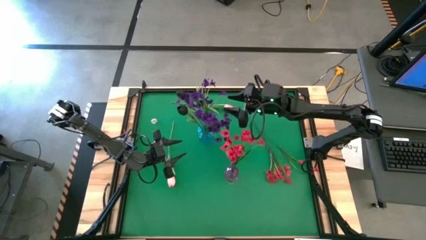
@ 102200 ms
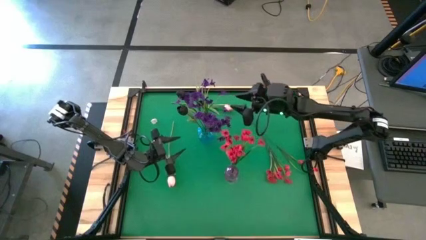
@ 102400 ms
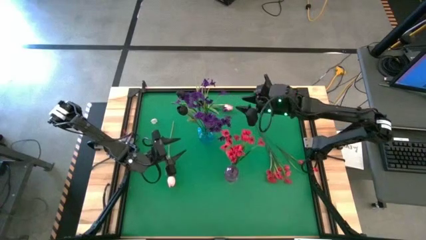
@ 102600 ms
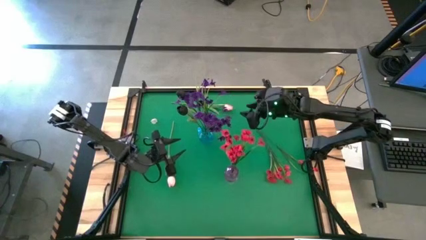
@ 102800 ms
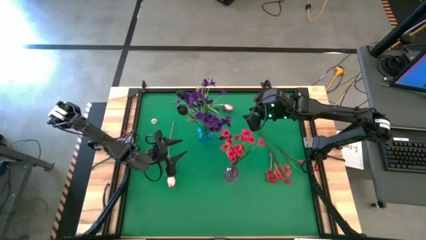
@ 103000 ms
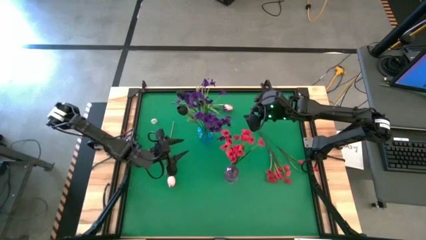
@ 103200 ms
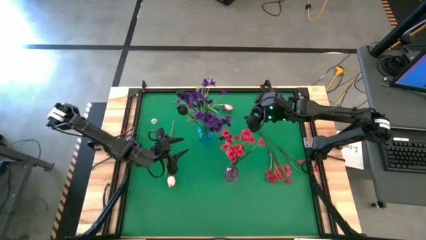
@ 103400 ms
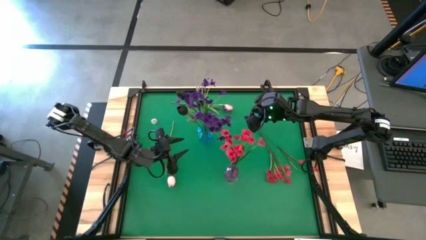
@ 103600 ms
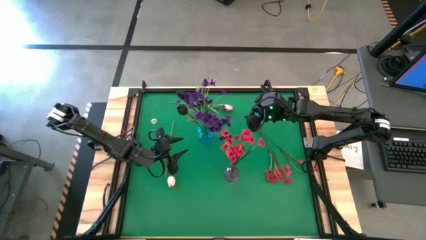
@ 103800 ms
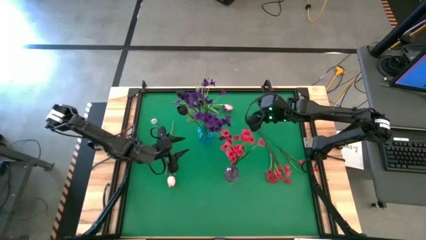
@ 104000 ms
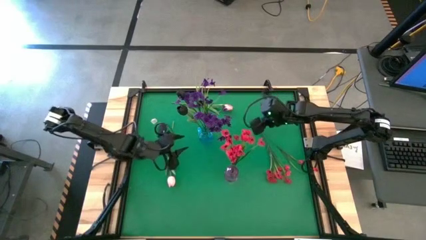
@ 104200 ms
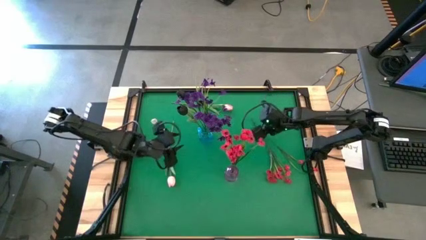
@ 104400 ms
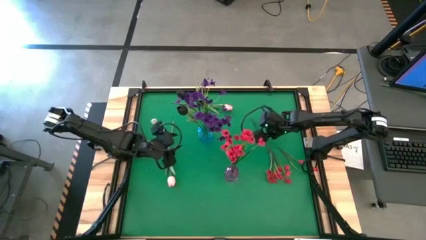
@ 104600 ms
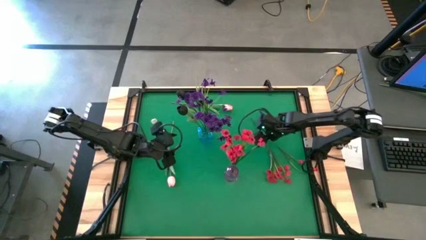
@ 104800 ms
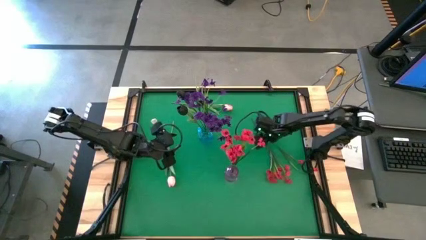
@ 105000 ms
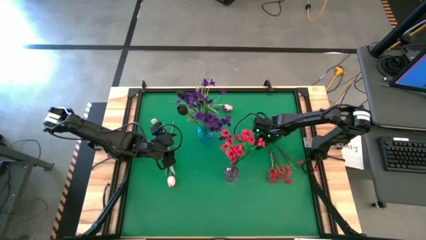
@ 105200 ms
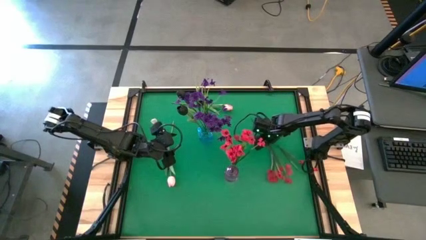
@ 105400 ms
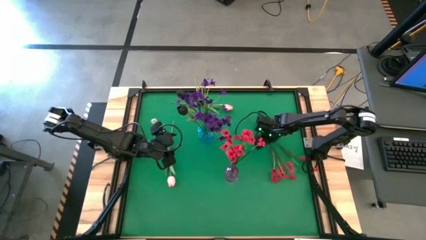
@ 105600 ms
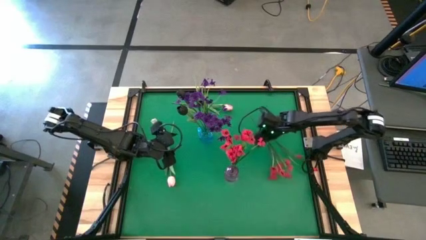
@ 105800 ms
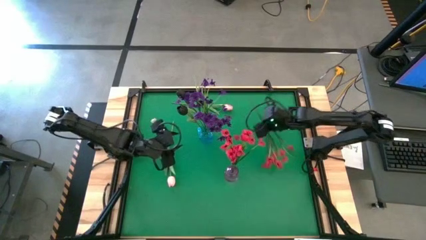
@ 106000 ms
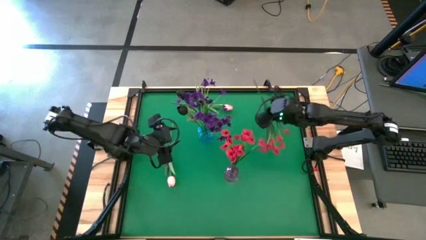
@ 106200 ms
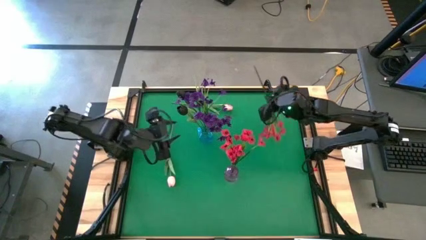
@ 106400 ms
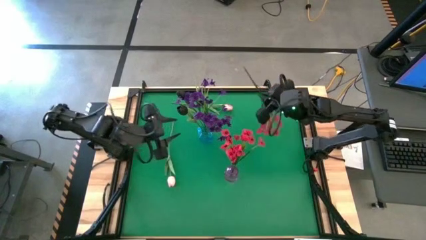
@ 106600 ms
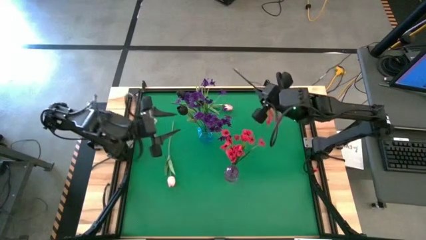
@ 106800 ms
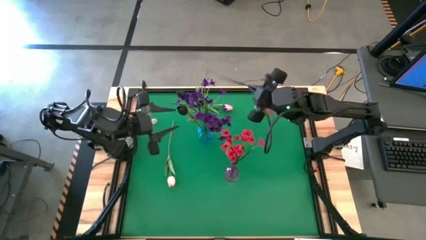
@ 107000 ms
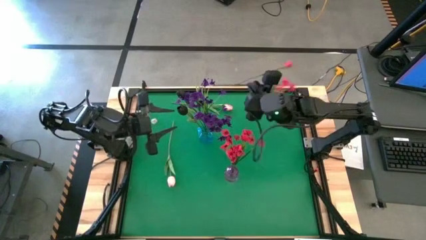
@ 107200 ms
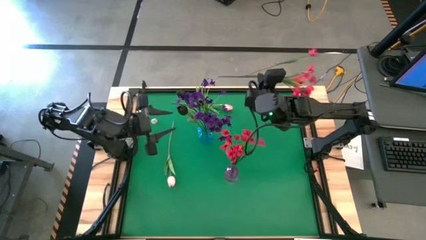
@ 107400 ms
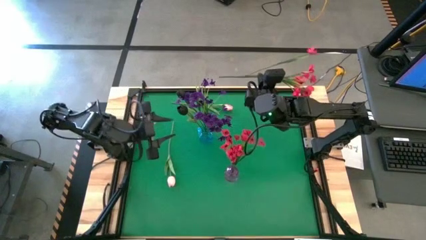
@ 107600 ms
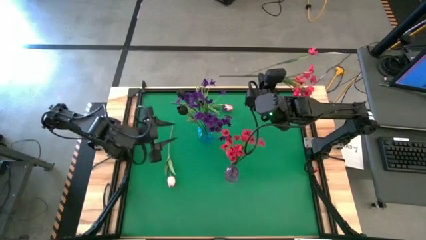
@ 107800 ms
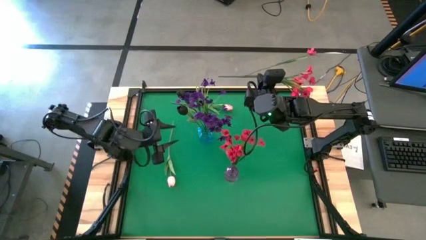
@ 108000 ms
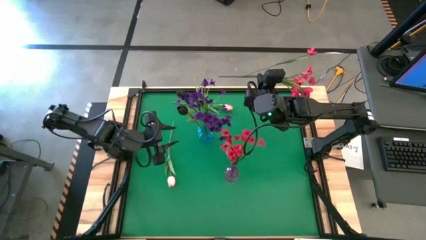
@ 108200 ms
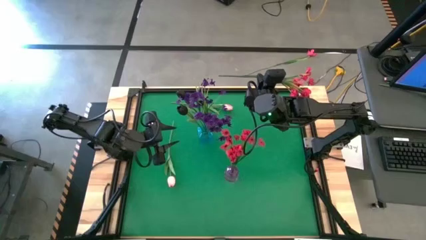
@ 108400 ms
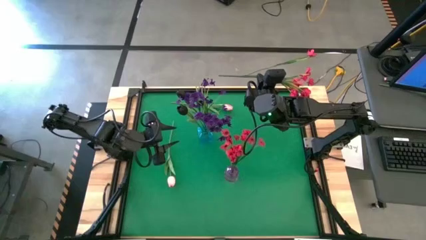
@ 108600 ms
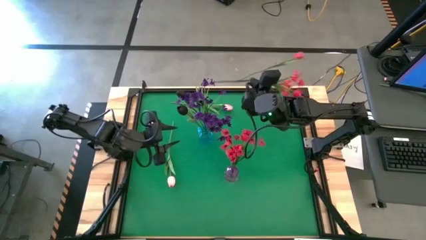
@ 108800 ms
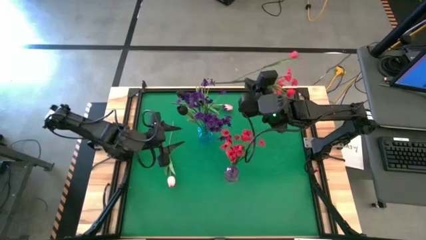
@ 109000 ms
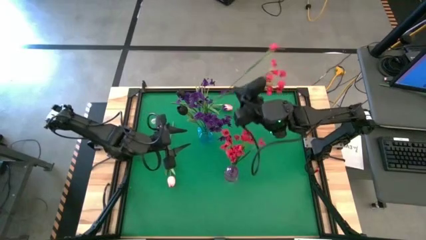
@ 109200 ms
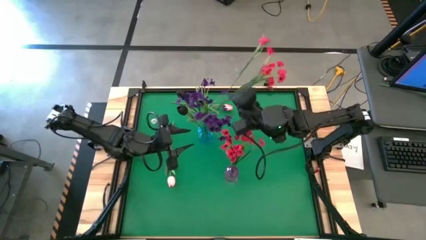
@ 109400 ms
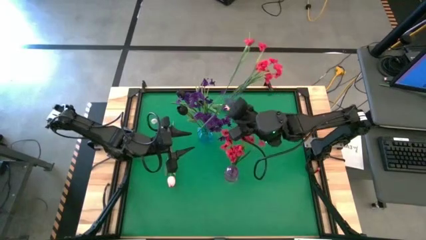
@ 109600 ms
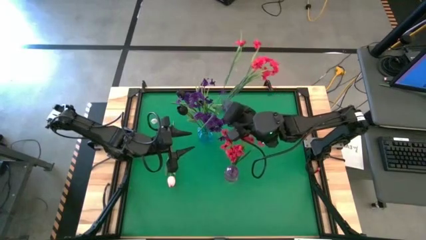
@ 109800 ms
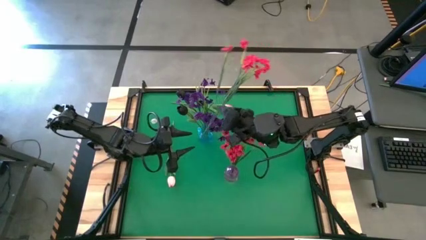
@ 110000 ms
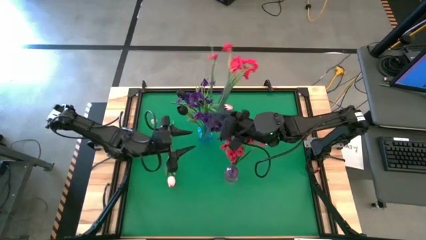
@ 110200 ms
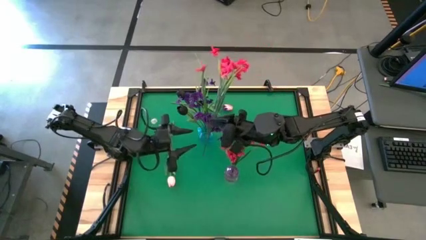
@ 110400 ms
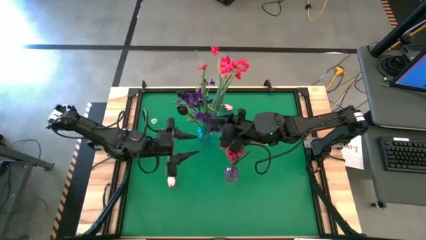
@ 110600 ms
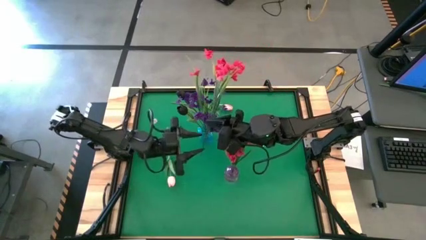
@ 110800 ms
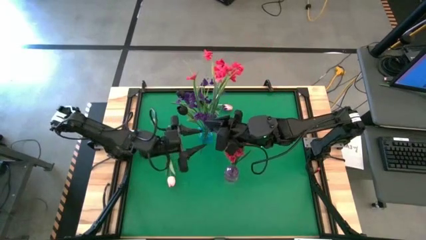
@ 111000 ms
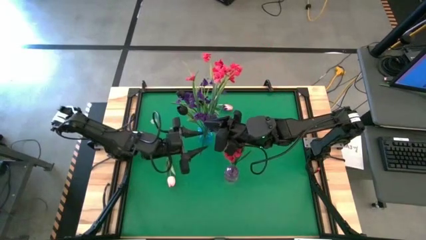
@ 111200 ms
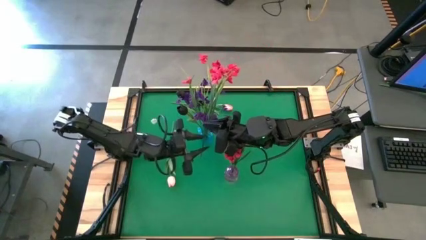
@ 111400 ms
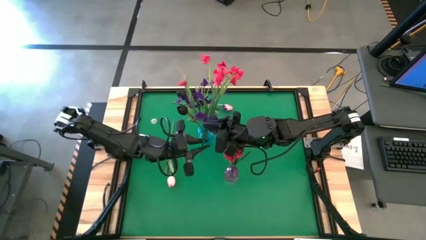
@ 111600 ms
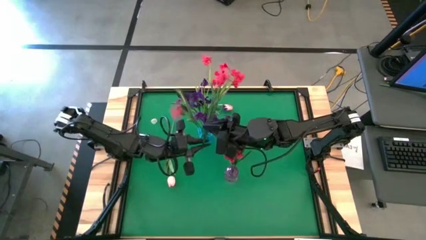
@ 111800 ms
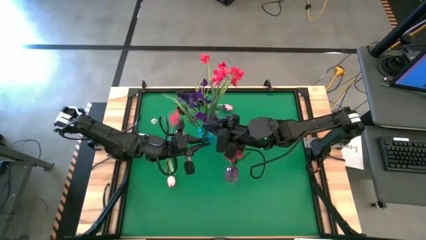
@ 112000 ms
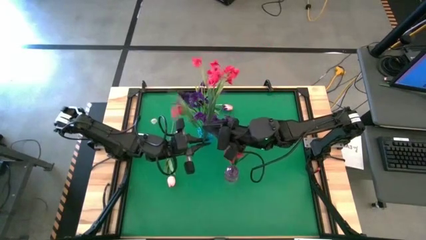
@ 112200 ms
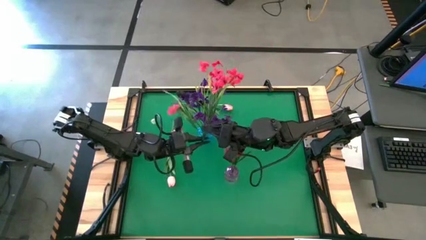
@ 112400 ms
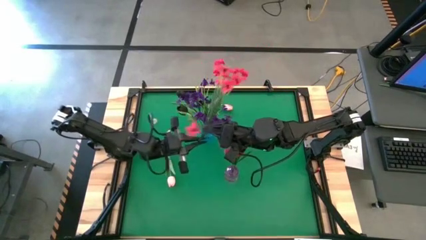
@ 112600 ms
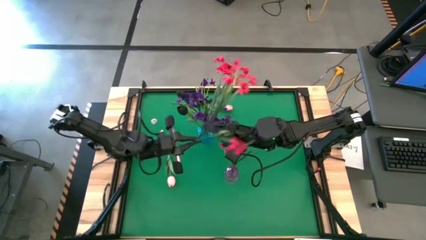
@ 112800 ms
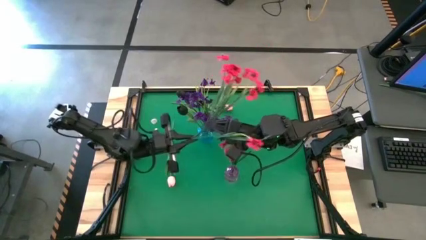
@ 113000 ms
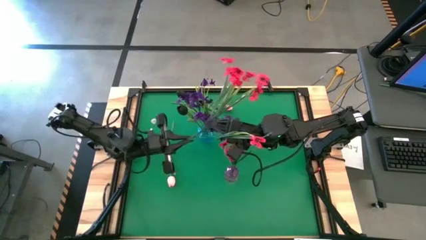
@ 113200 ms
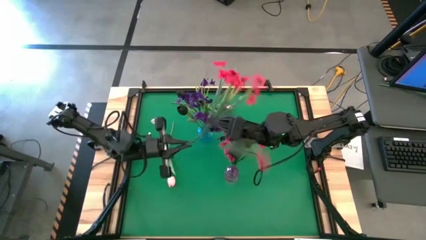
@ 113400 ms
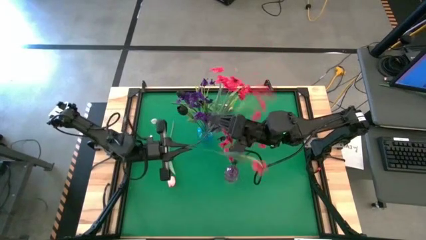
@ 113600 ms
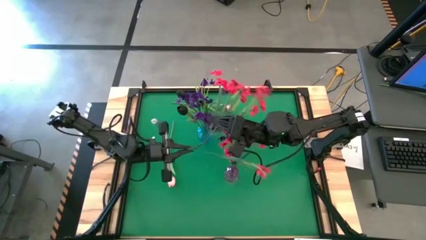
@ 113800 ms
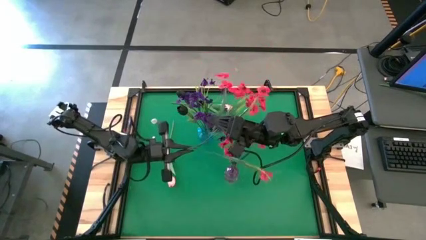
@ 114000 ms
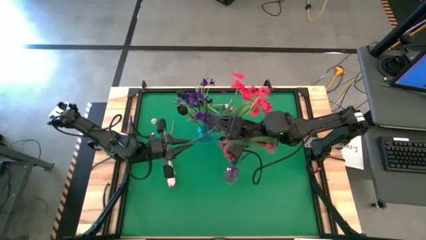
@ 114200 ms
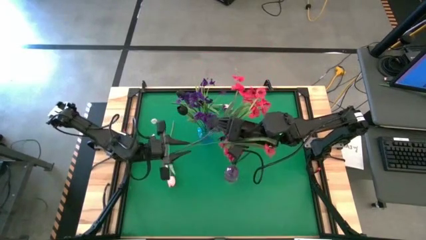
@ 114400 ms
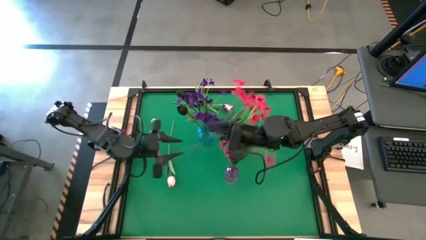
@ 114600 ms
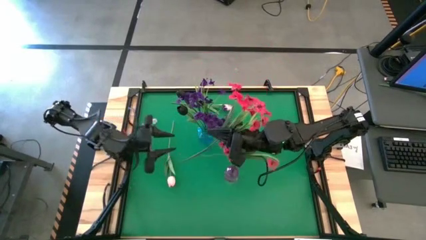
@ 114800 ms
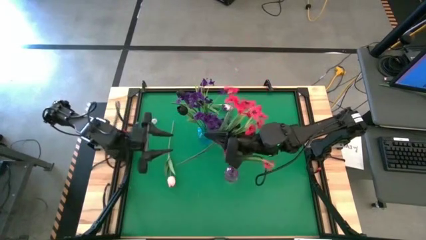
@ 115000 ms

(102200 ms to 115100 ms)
Task: Sort flowers into vase by color
Put the pink flowers into the purple vase

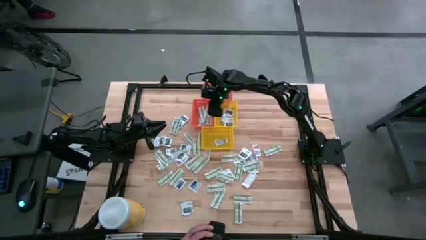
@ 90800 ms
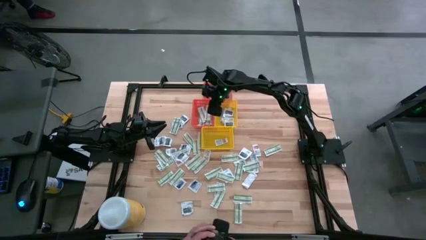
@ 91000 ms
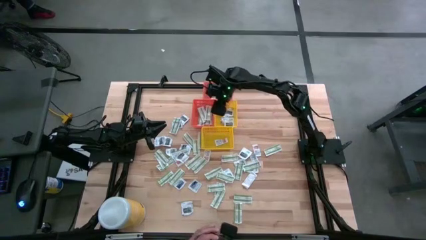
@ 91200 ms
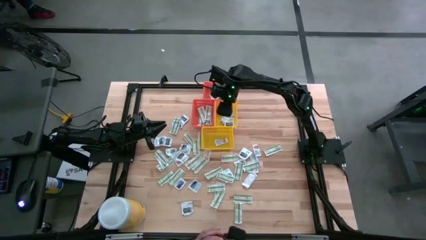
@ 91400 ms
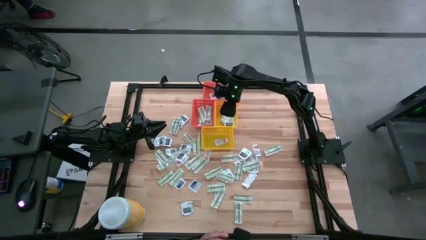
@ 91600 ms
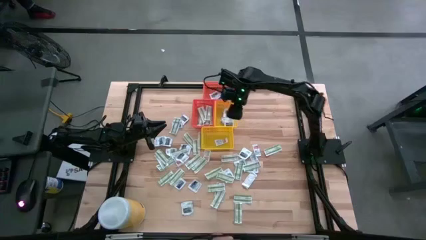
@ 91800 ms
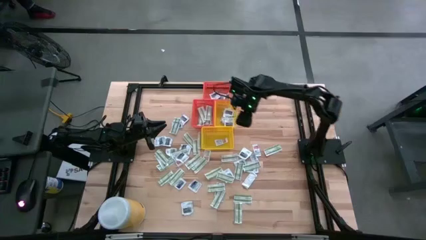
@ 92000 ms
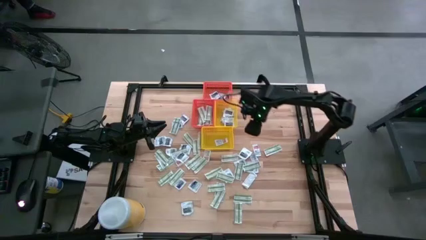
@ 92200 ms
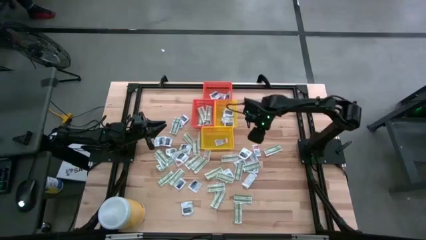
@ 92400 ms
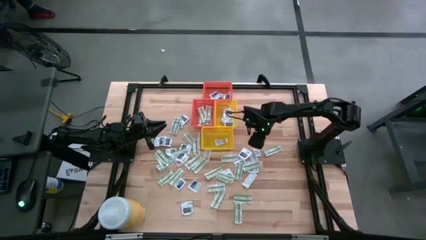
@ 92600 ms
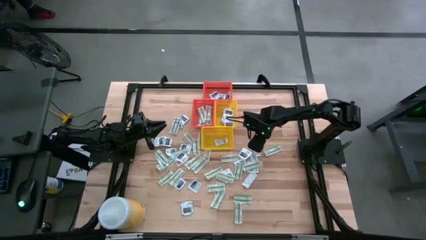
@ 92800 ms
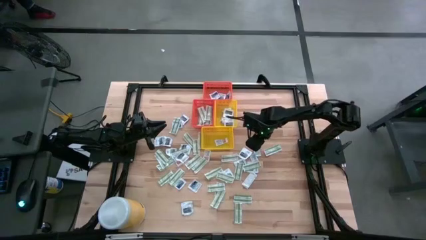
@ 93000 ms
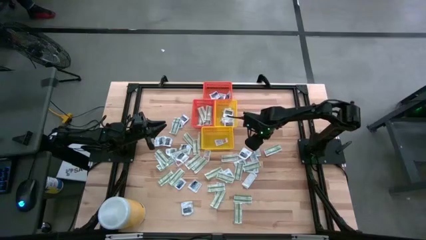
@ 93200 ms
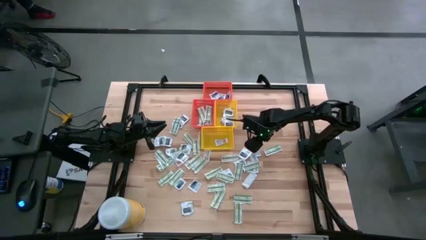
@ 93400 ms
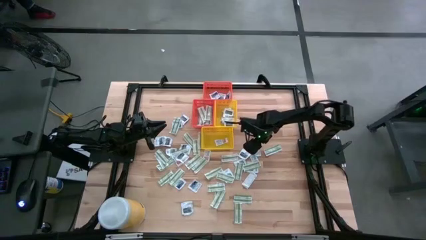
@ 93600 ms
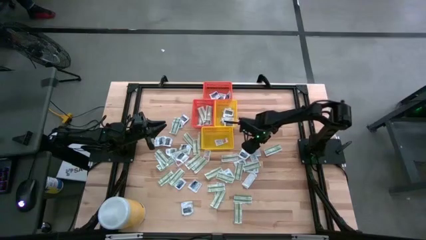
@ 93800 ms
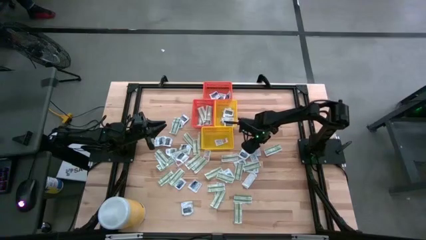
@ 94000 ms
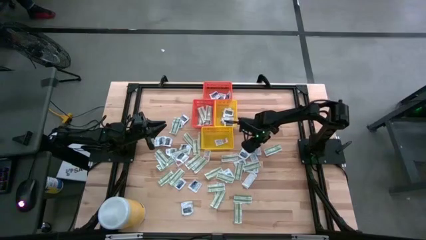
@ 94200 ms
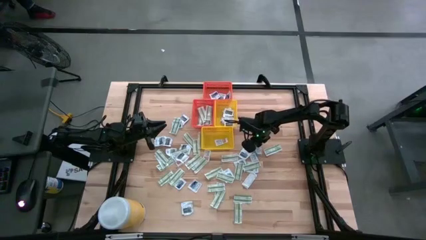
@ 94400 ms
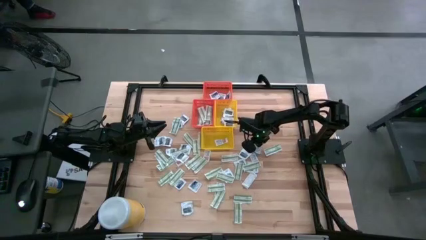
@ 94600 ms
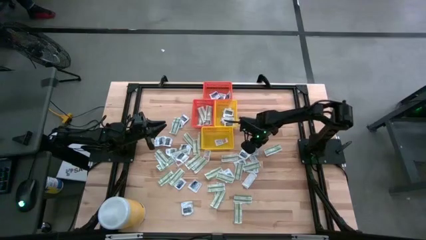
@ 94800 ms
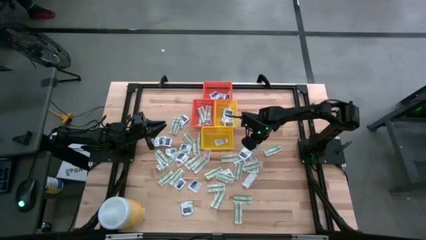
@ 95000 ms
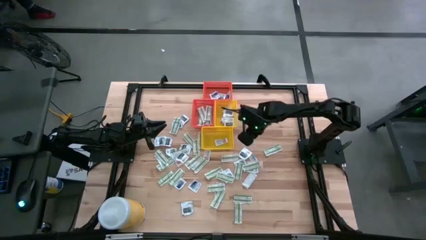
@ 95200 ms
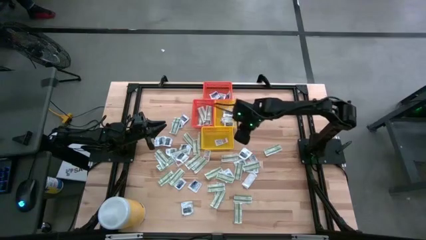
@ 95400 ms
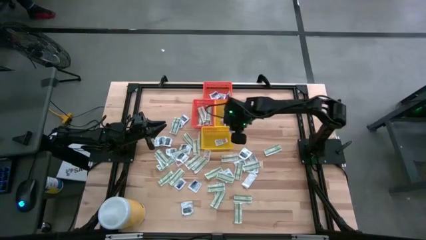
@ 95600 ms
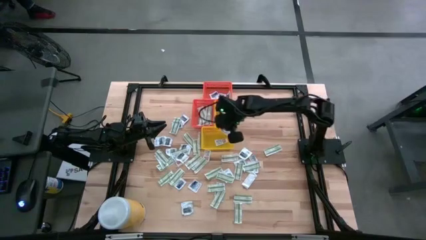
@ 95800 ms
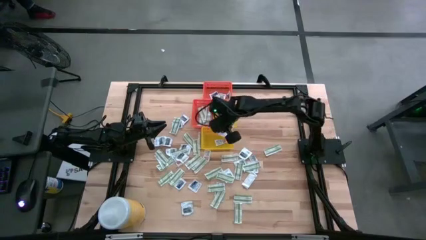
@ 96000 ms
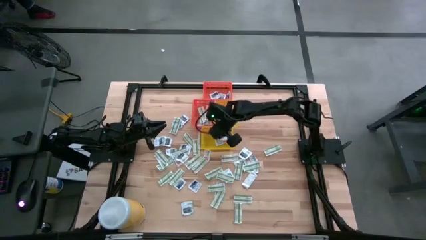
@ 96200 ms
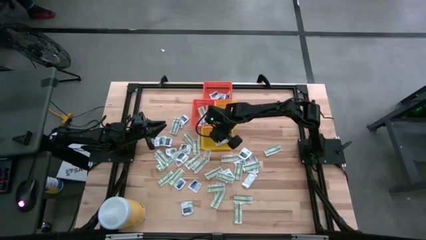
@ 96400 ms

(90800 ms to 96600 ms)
Task: Pick & Place First Aid Supplies
Put the ointment pack into the bottom yellow bin
